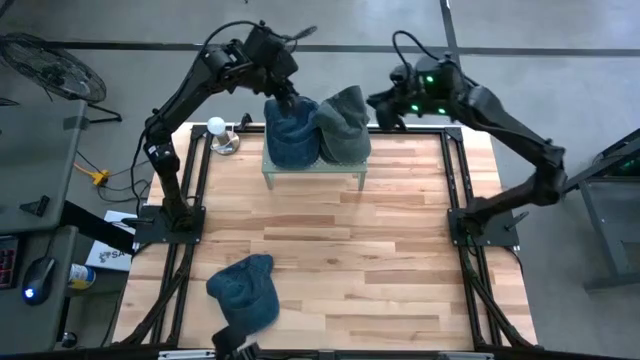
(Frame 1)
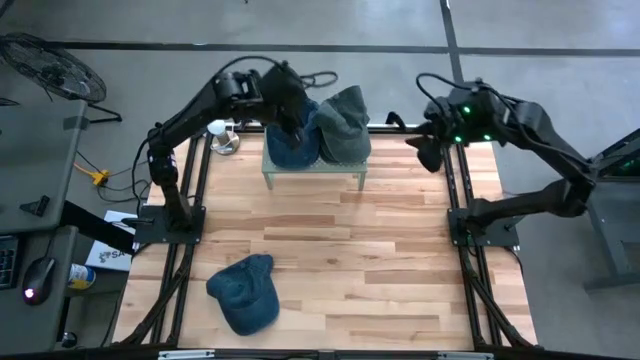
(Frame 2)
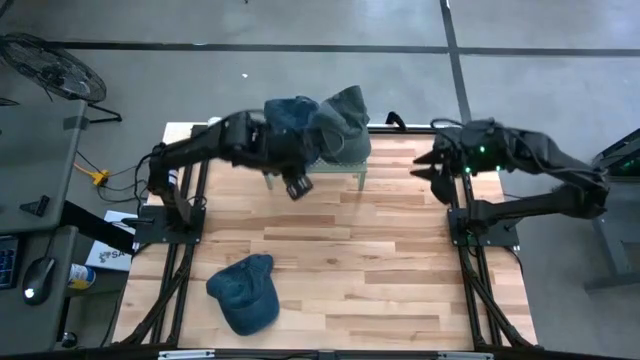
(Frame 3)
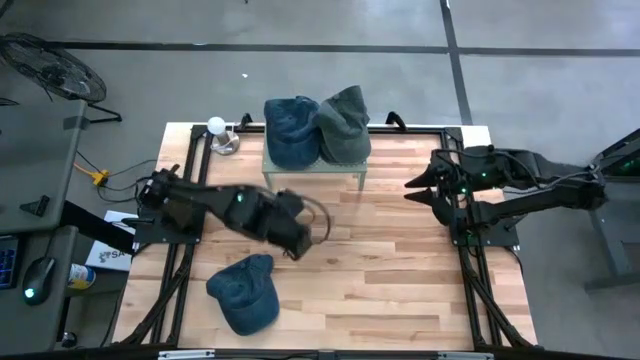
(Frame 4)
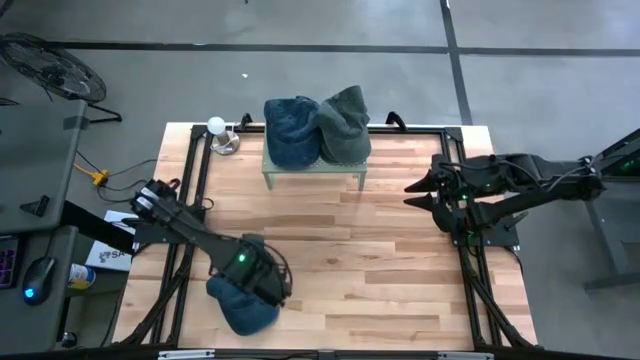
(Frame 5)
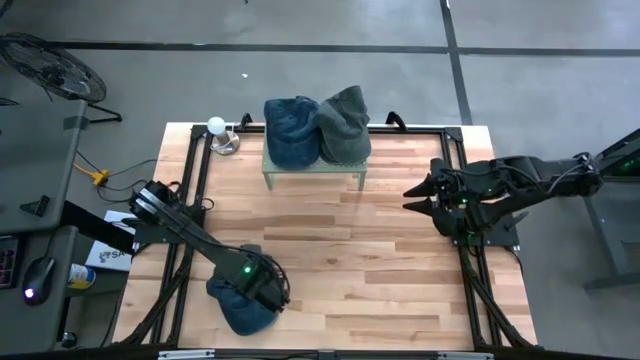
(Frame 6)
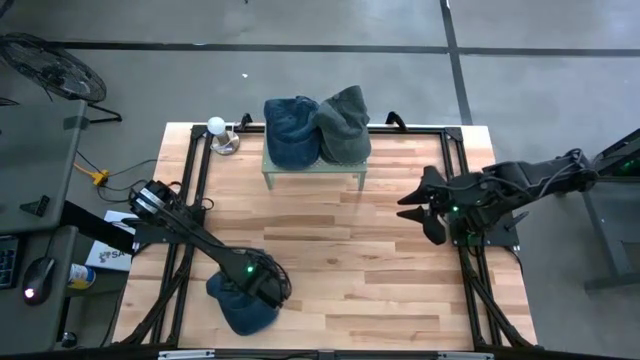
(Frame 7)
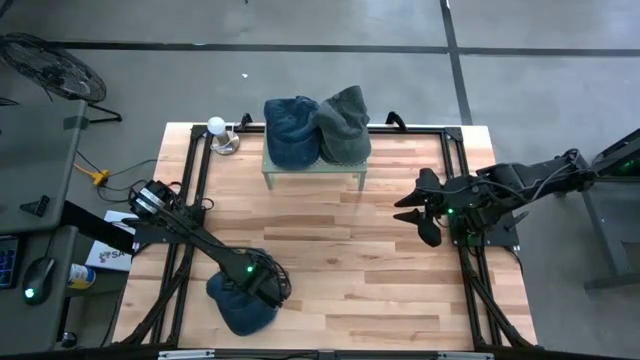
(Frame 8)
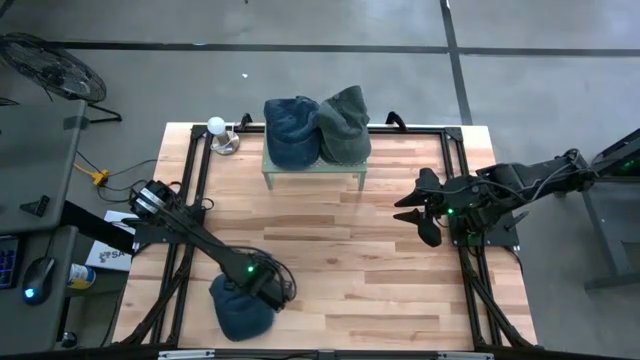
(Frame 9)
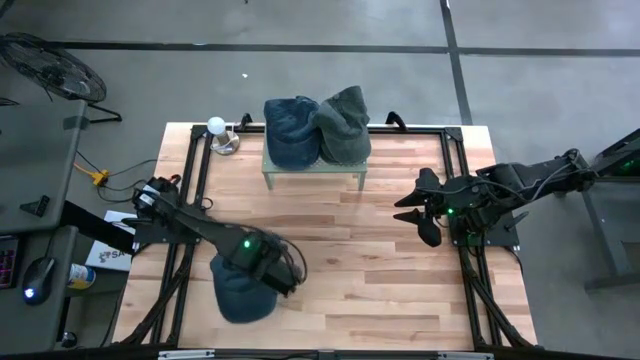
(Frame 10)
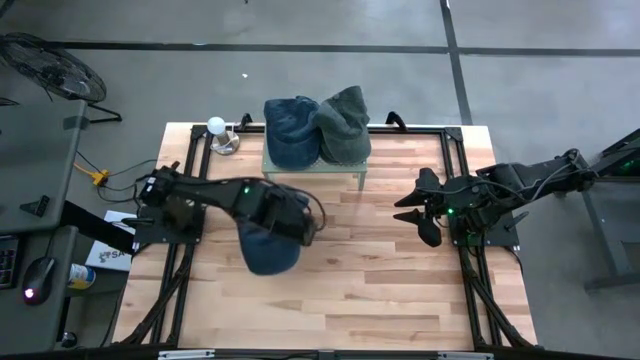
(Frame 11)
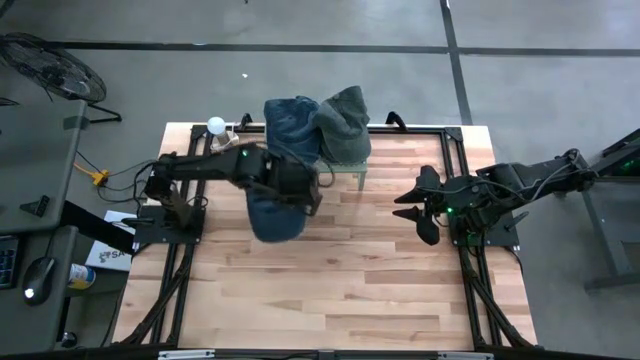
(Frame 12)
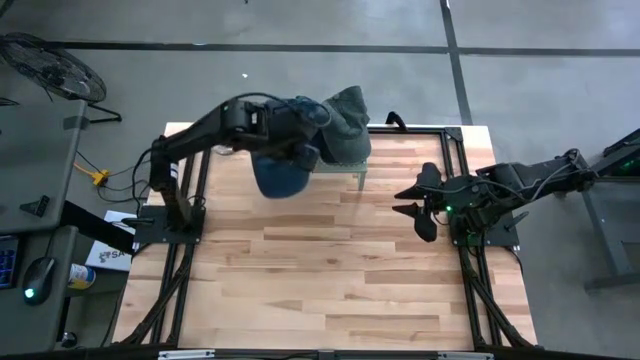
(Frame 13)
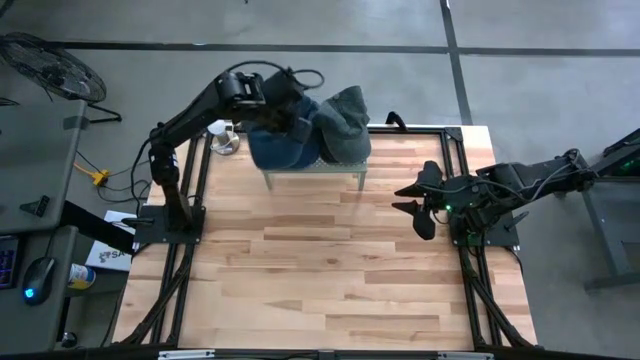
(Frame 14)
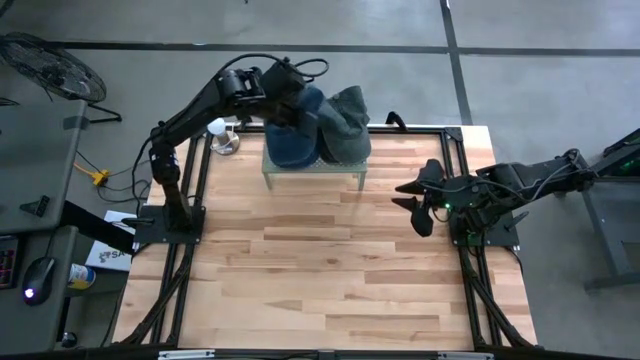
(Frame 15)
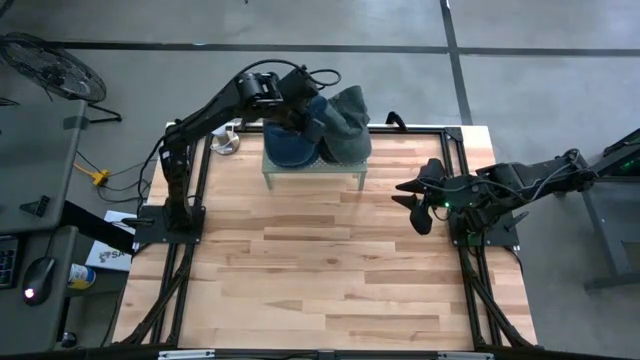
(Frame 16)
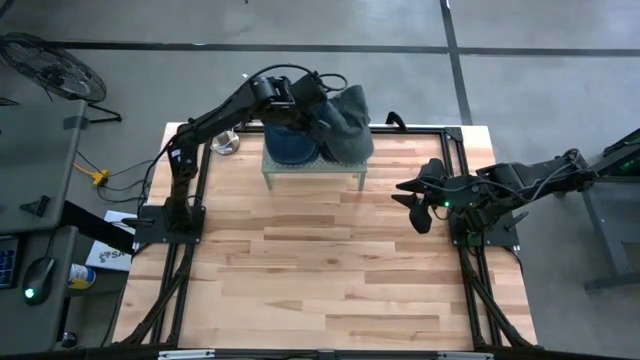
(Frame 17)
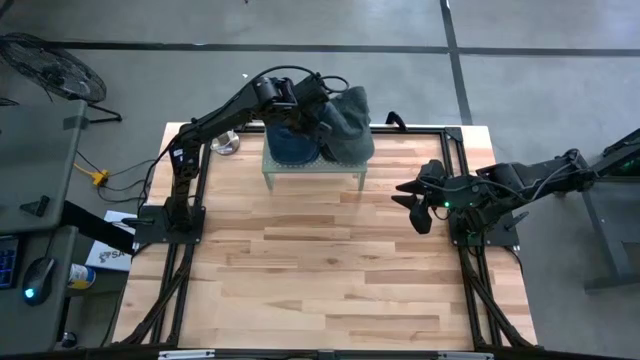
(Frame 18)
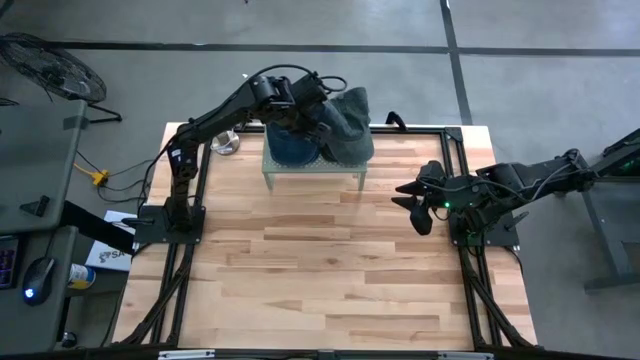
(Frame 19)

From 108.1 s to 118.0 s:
Task: Pick & Place hat
Stack the blue cap on the stacked blue cap on the shelf

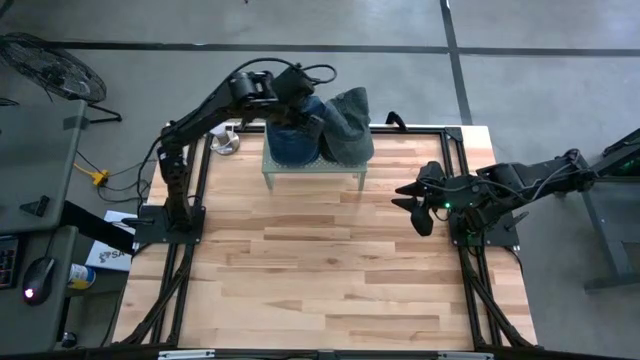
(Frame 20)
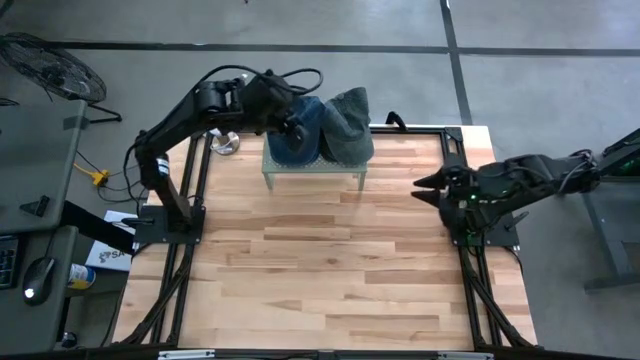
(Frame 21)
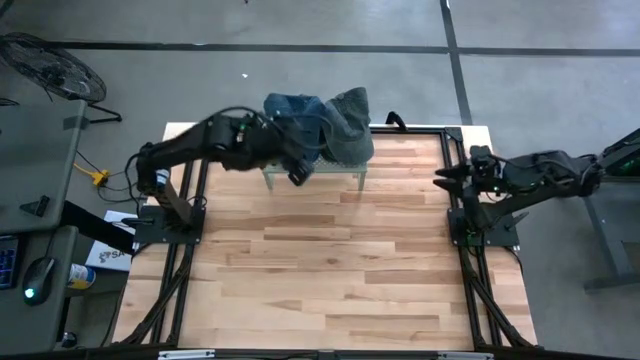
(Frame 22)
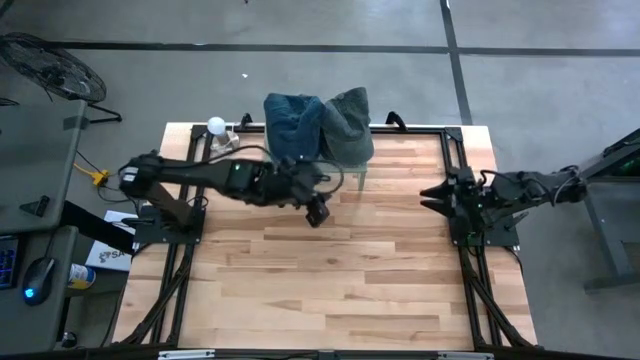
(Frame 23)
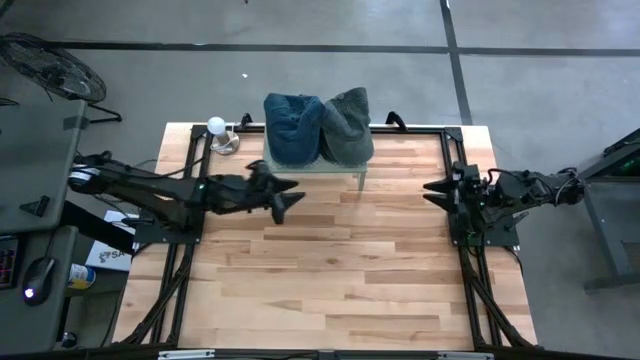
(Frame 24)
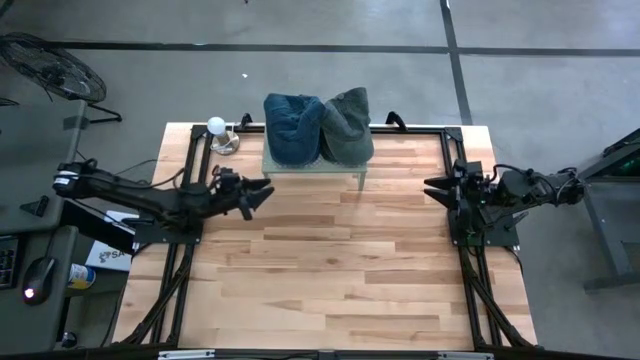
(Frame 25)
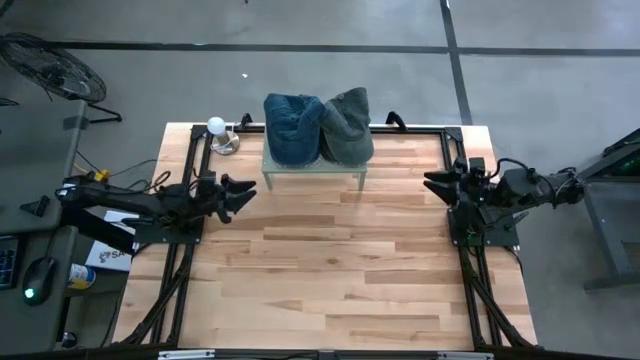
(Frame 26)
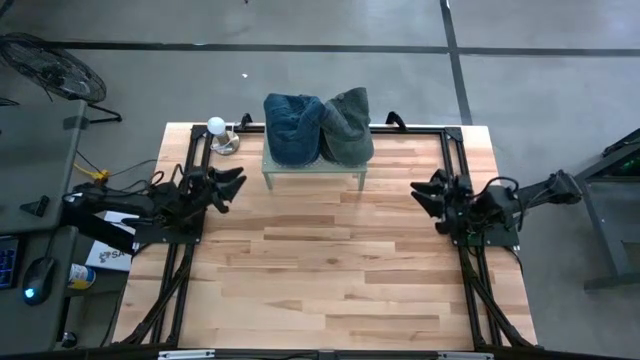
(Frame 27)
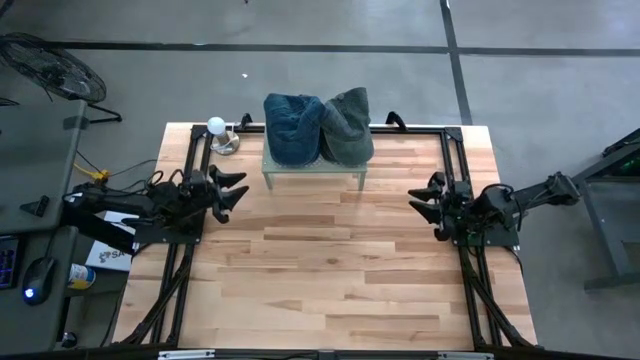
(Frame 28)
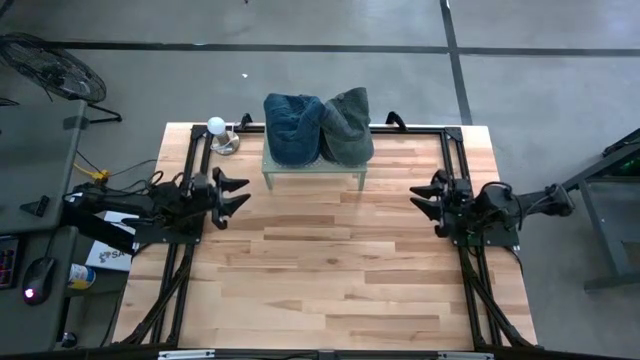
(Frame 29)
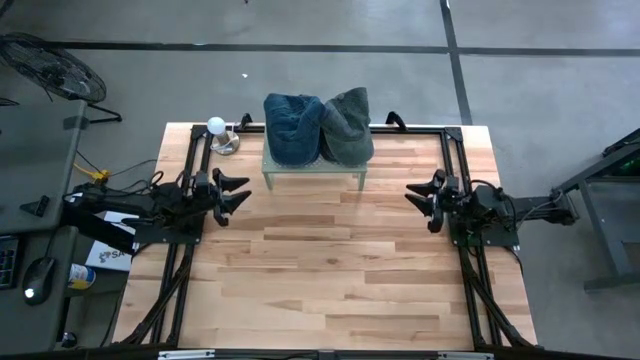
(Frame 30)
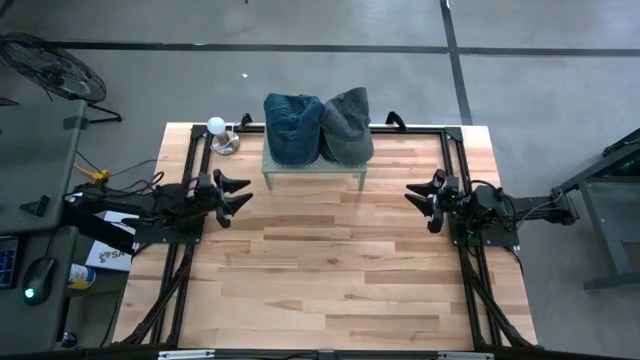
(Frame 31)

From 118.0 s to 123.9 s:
Return to Home Position

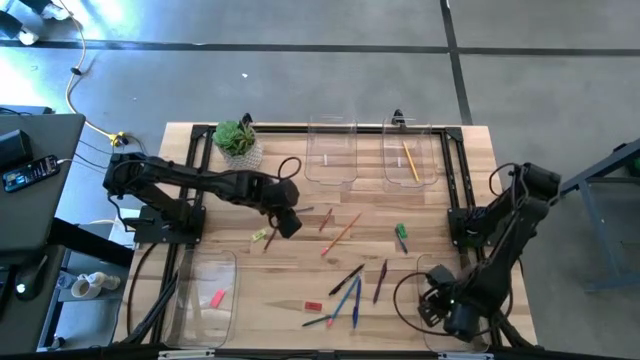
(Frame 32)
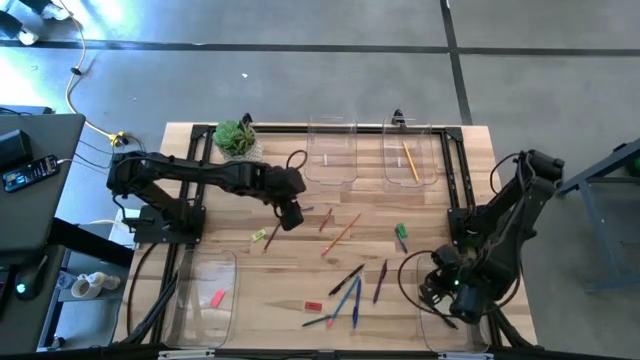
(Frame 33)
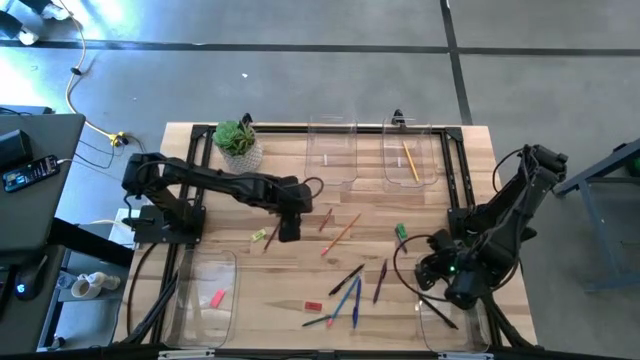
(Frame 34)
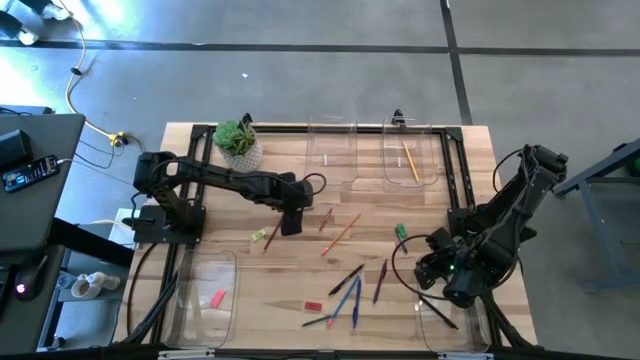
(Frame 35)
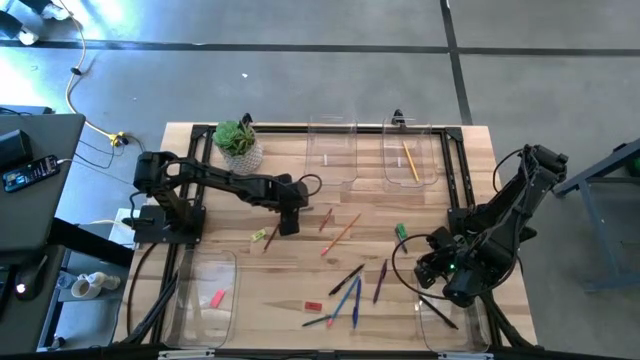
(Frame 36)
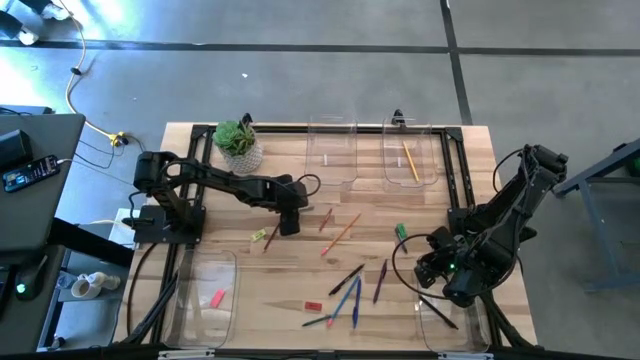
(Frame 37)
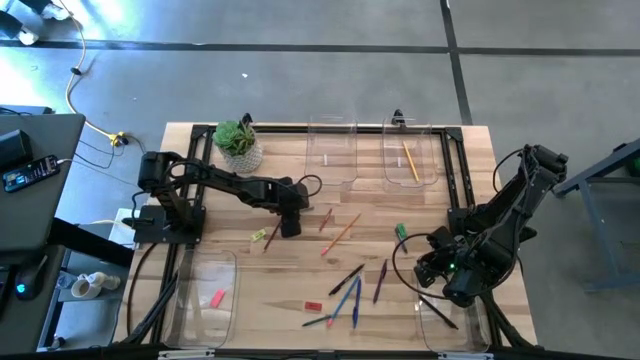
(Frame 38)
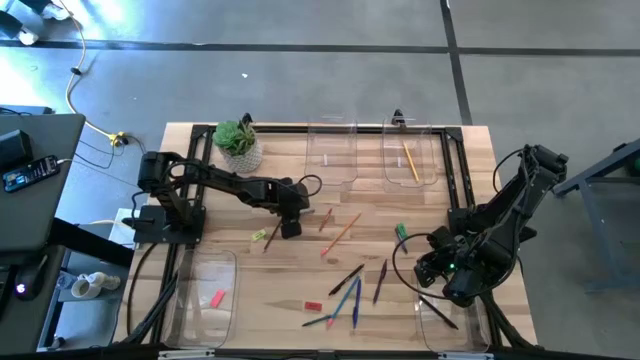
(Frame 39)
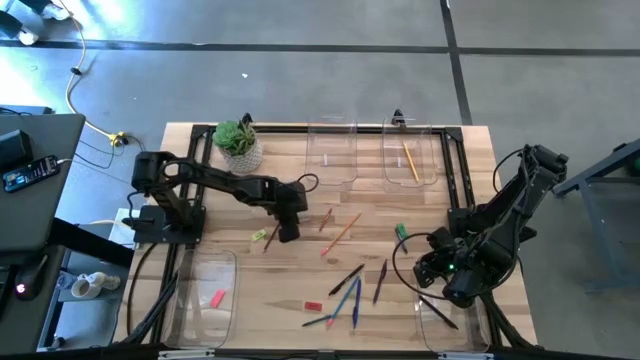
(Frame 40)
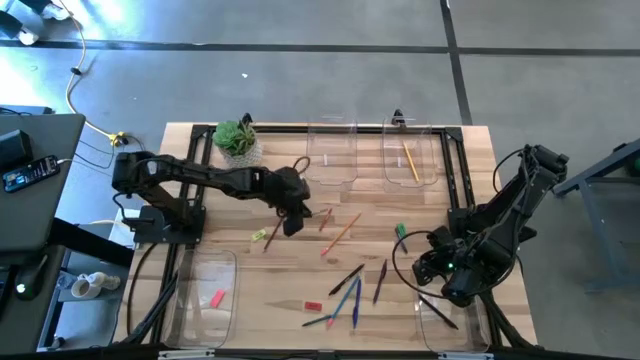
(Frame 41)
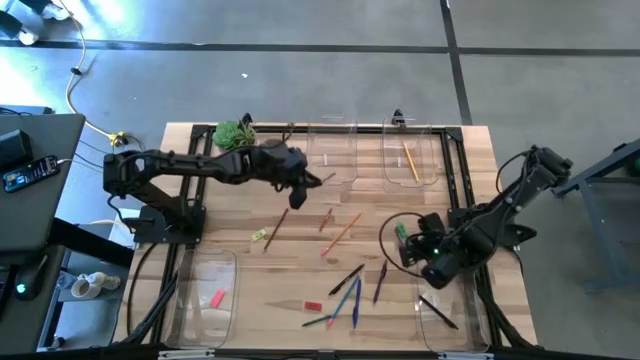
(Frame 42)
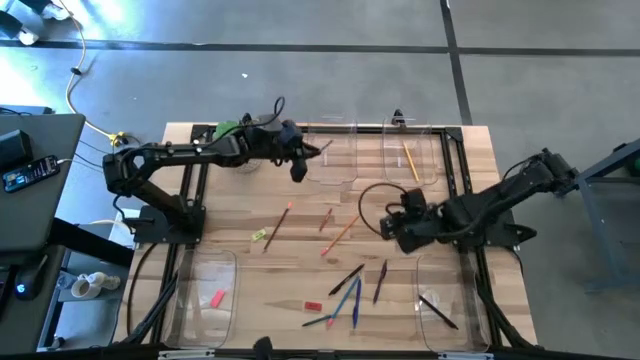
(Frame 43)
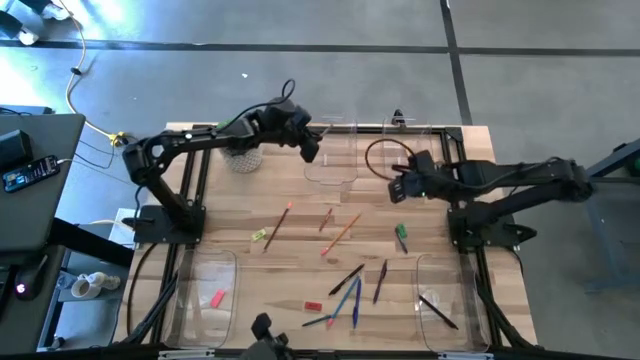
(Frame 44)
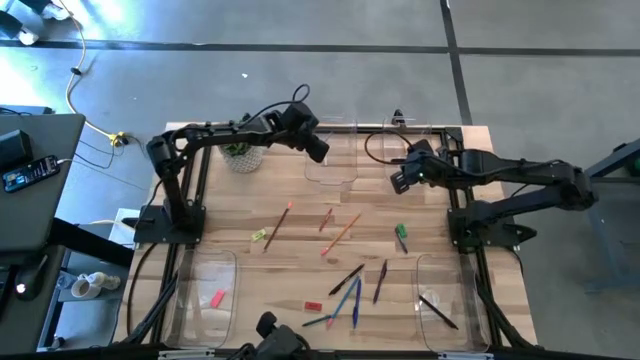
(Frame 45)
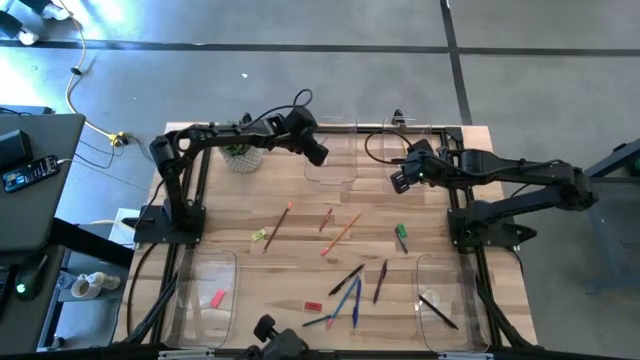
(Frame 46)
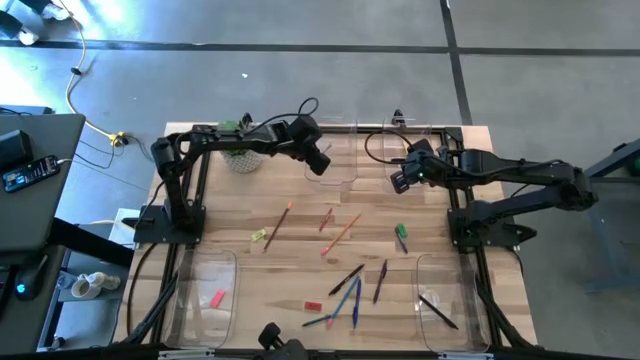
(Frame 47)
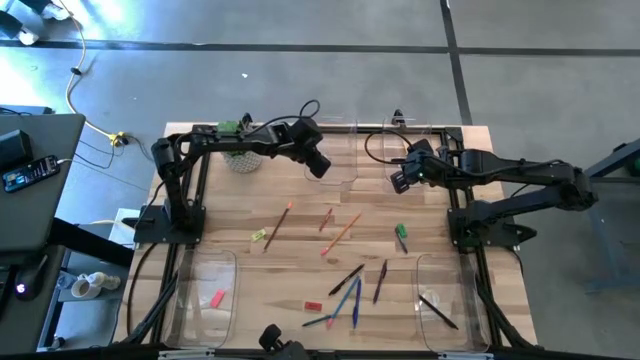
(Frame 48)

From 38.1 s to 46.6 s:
Task: Sort crayons/erasers/pens/pencils in bins
Put the gray crayon into the top left transparent bin
